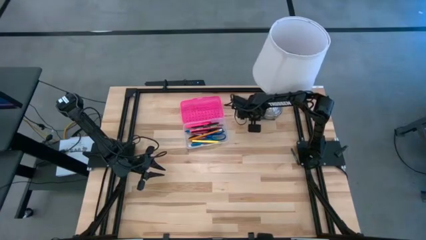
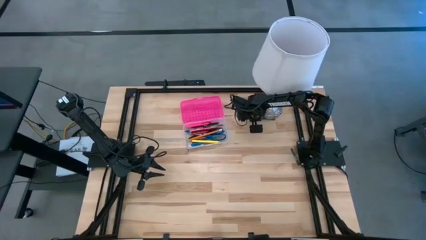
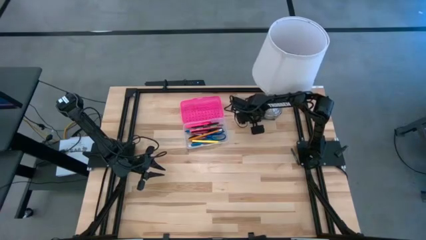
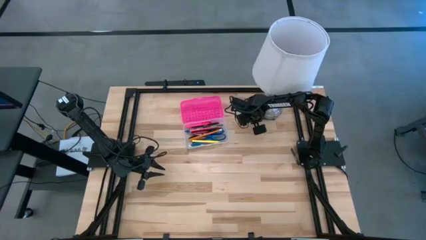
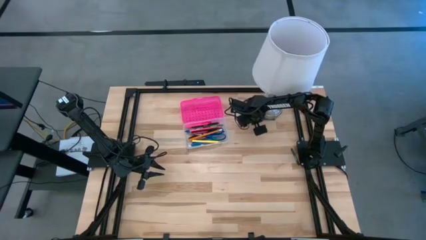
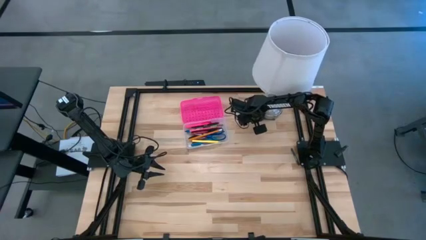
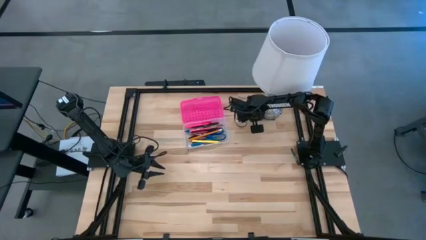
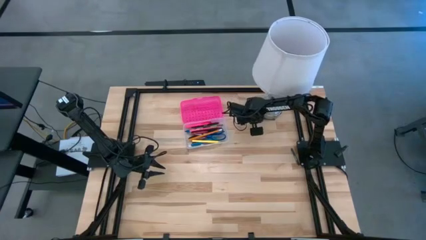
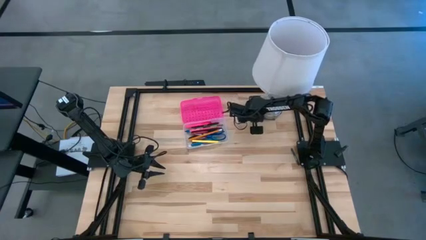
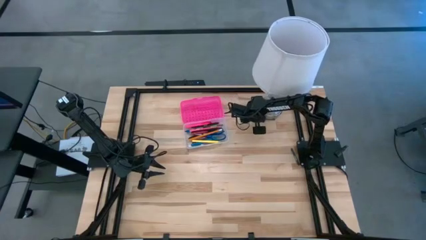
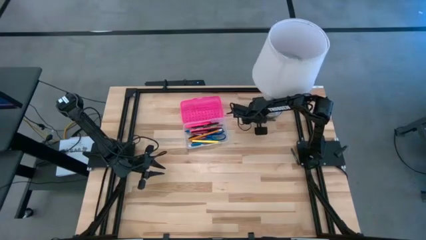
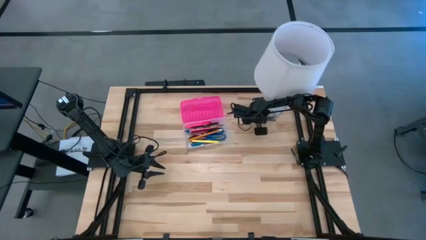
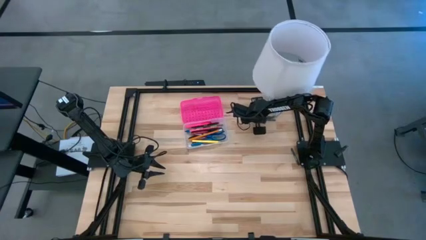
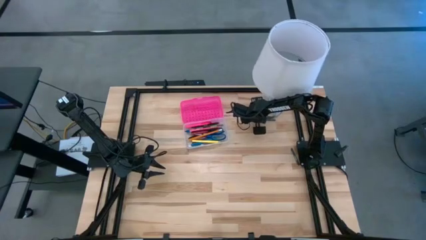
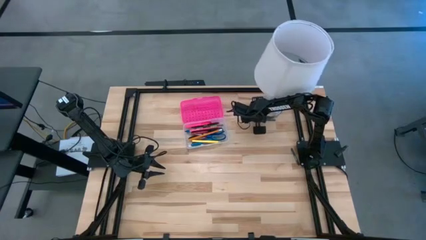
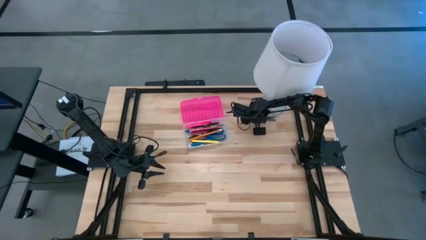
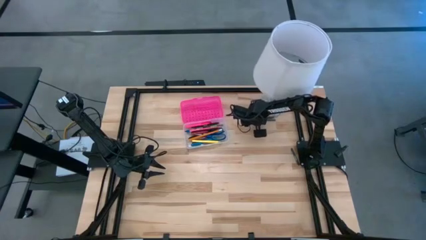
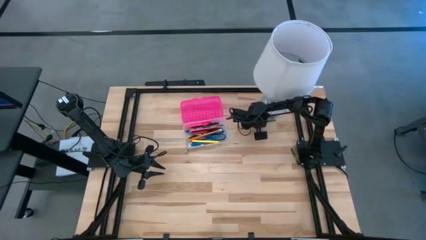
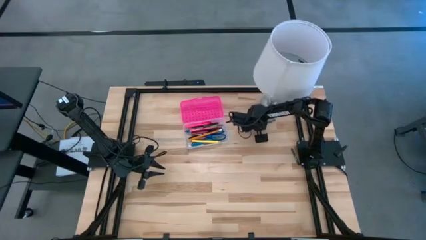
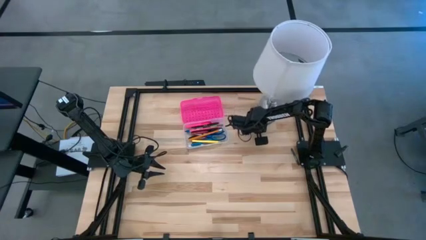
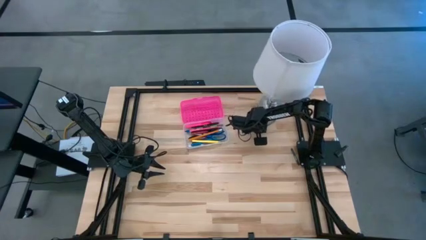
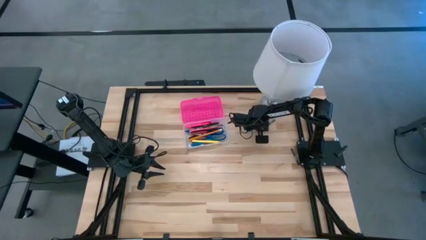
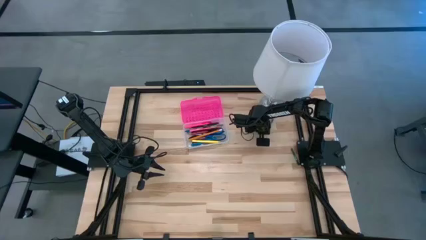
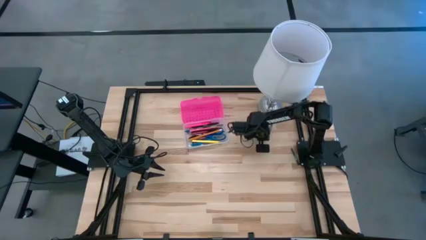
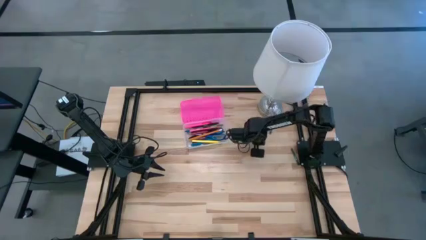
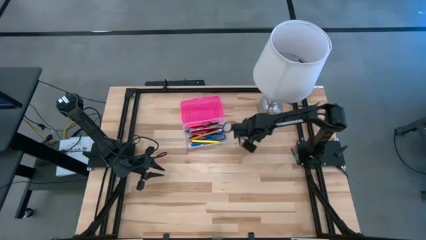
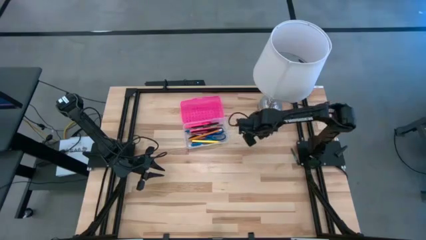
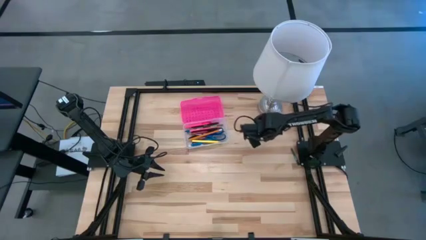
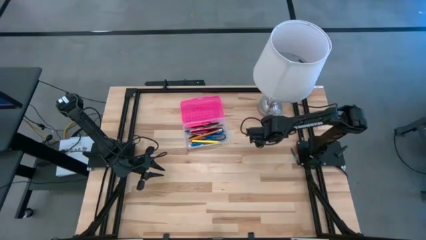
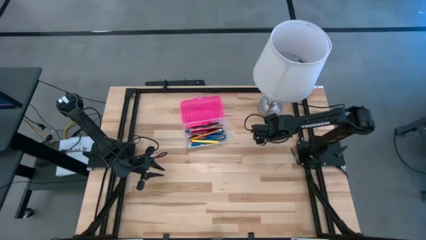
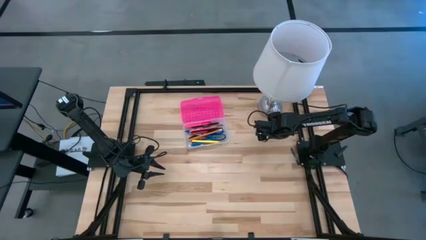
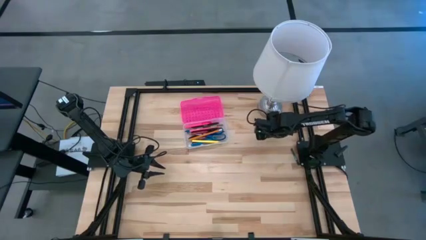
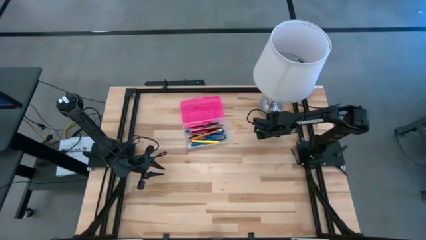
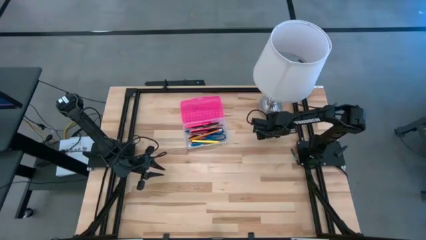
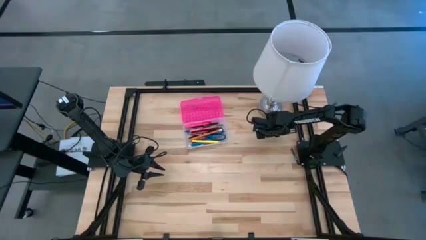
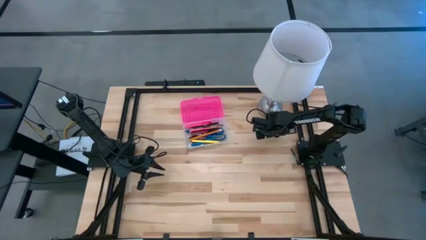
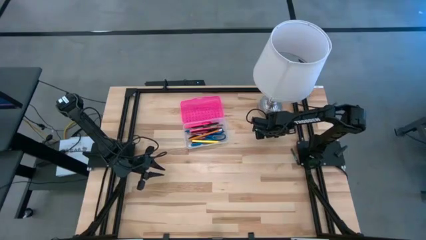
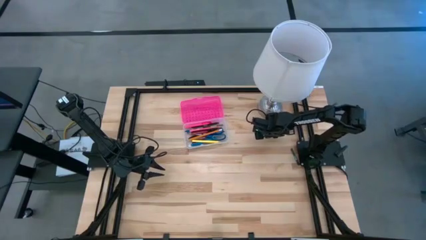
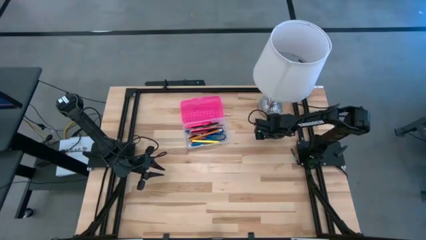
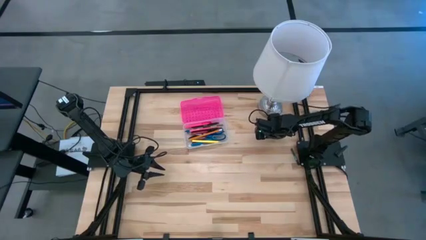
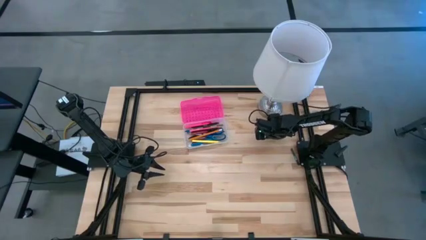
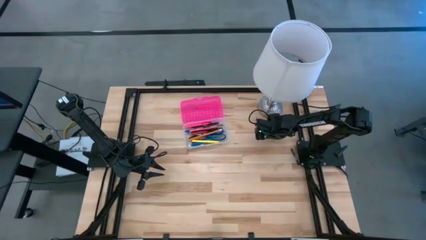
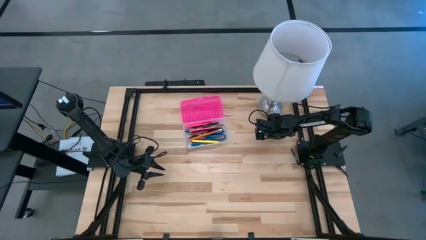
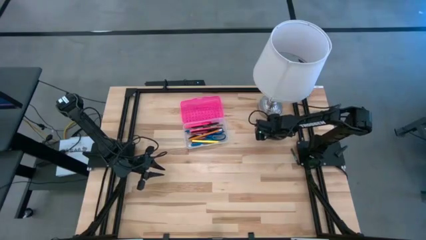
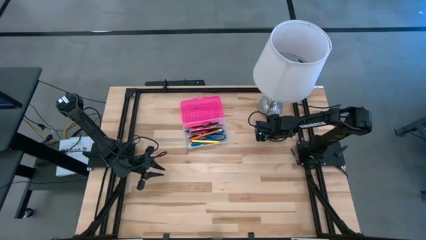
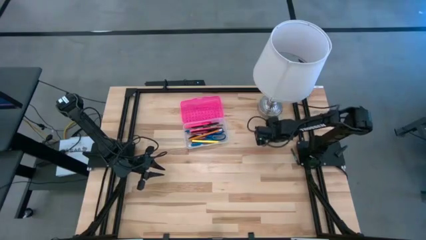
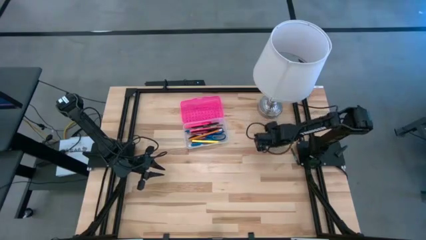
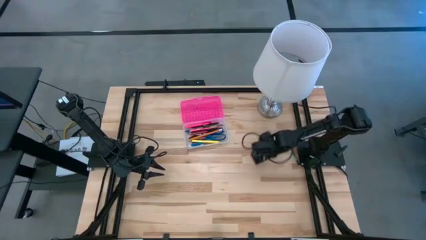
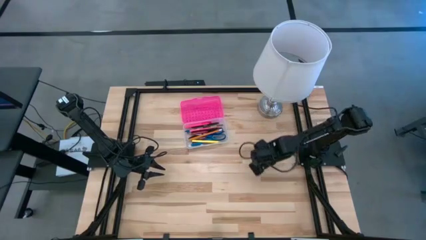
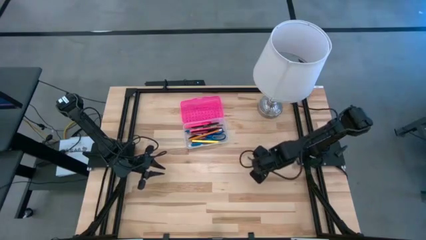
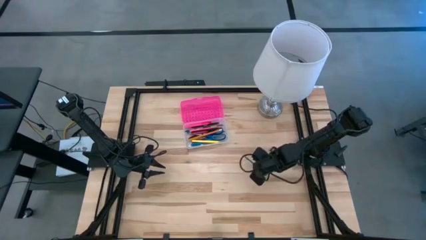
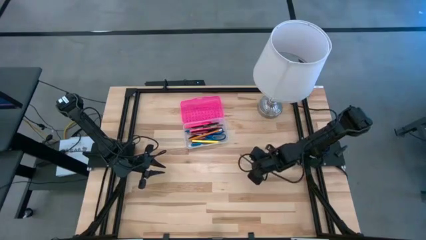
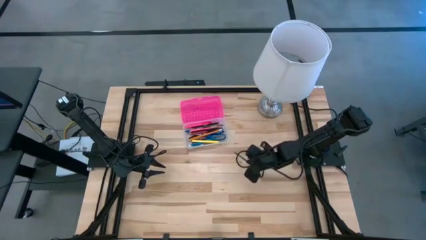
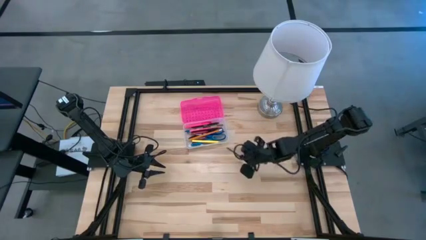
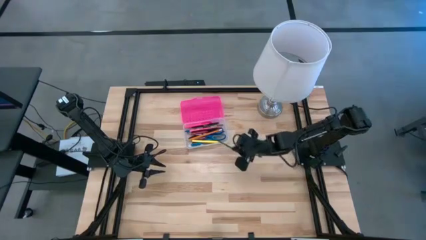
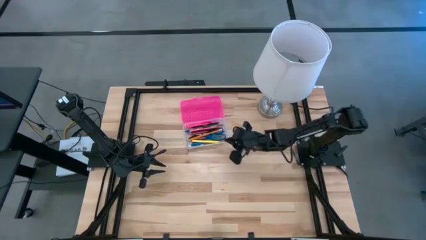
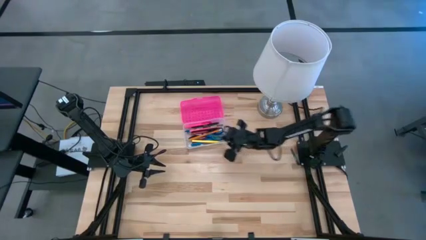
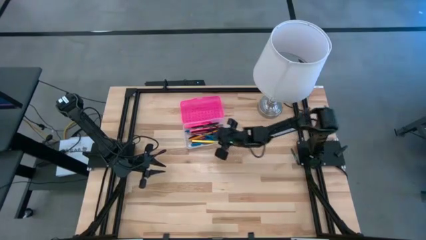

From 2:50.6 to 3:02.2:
Task: Pick & place school supplies into a supply box
Put the green crayon into the pink supply box

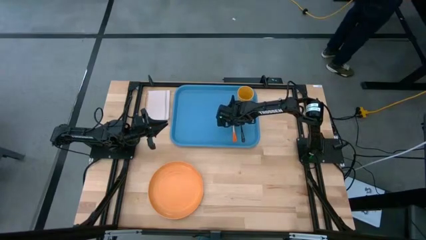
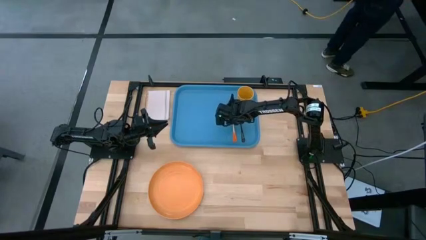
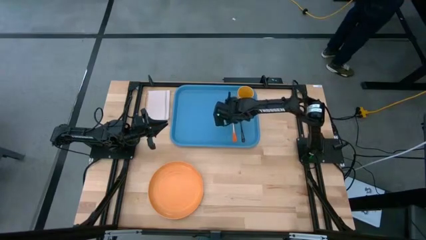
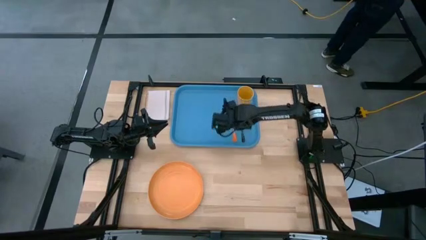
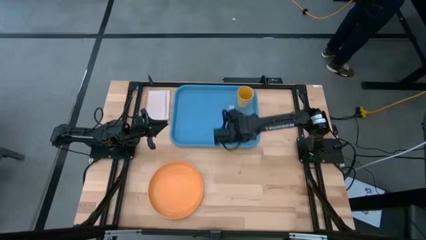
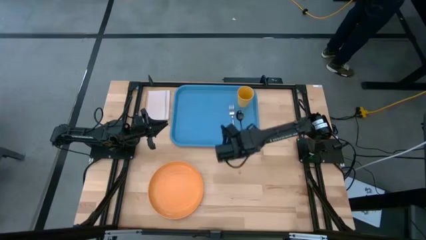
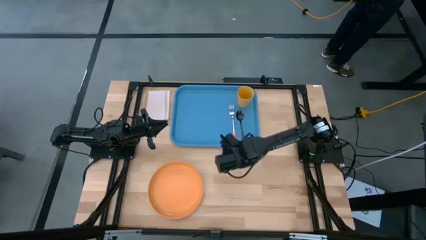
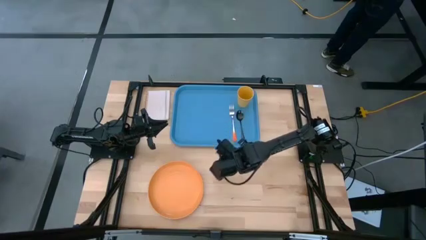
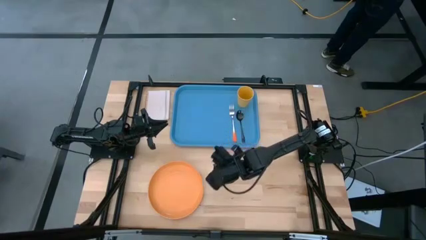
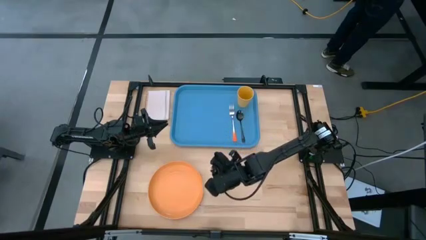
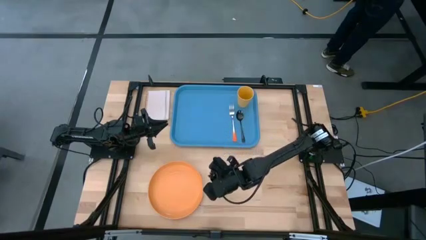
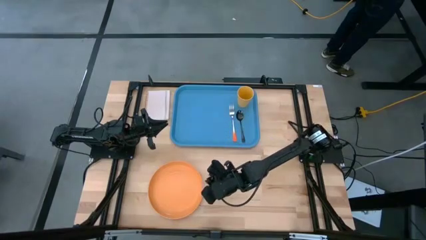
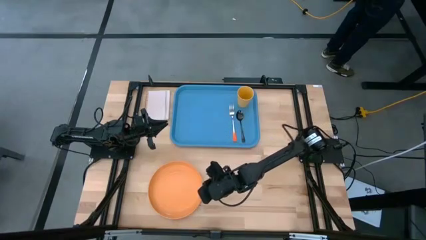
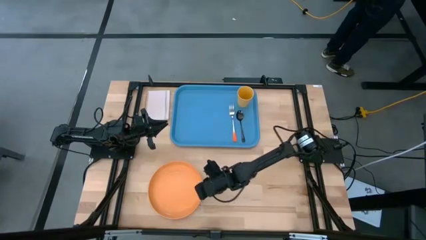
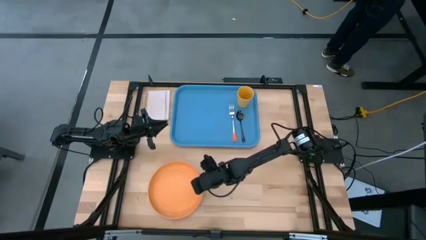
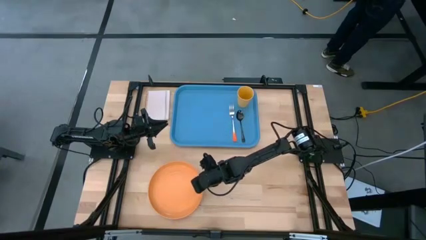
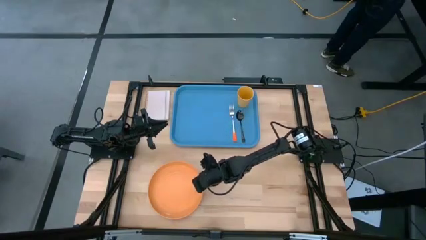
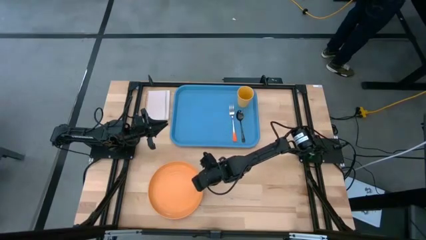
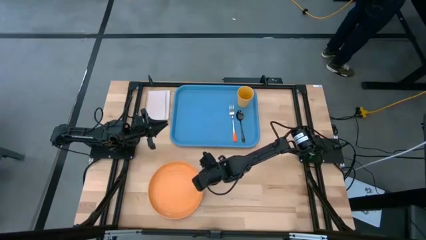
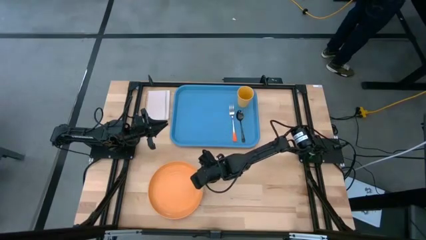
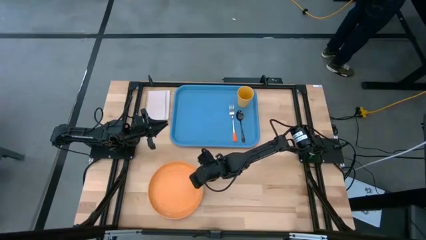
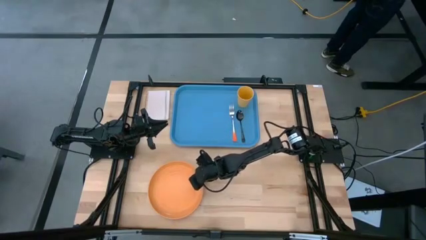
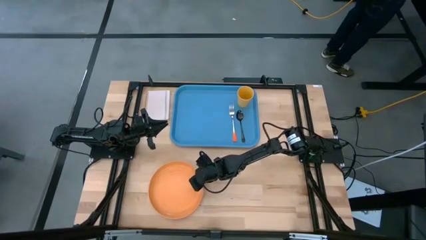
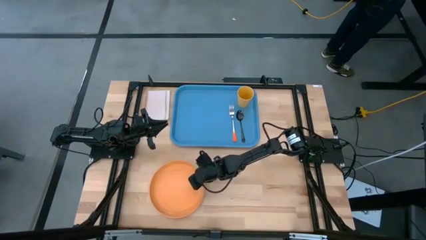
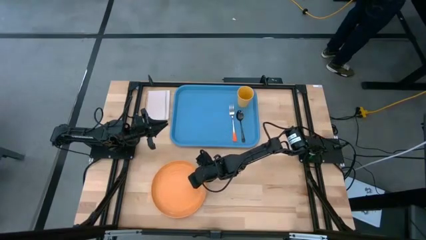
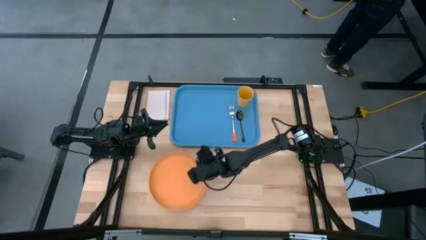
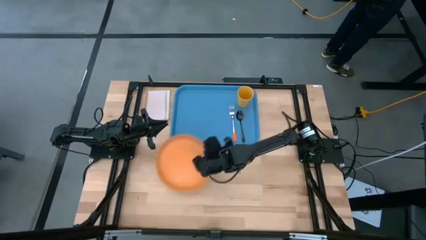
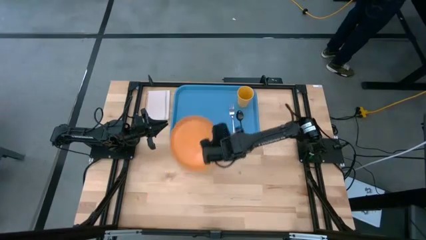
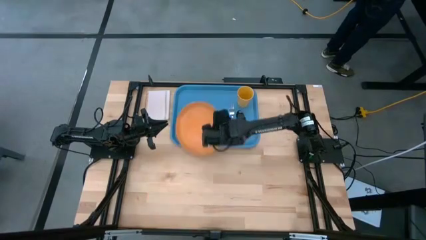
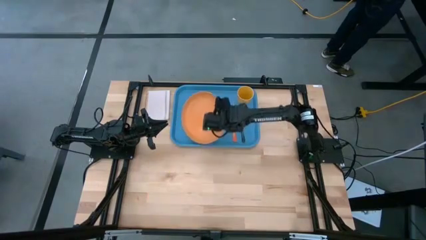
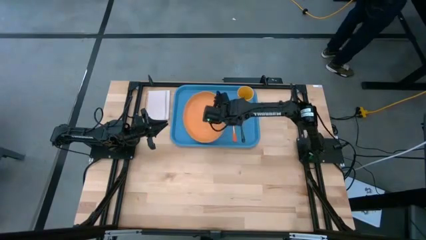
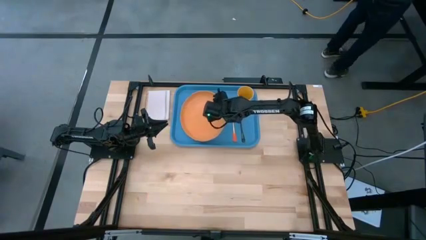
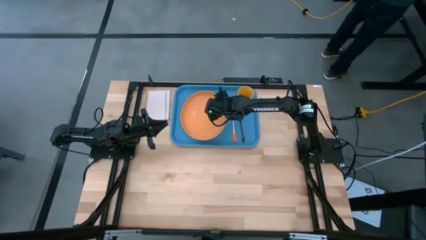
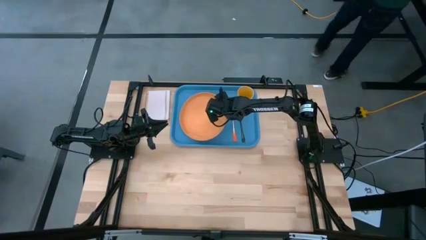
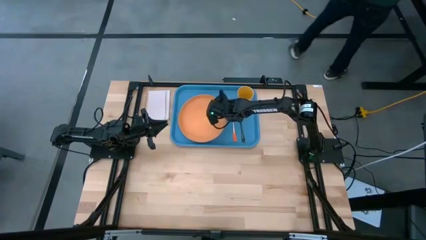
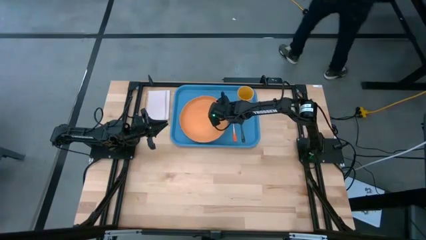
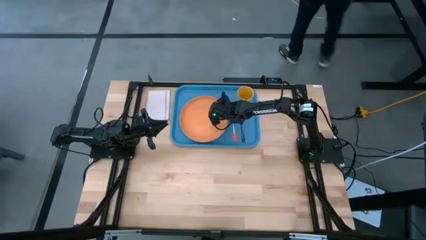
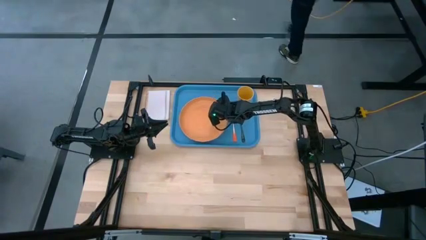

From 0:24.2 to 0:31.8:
Task: Pick and place plate/cup/fork/spoon on tray
Put the orange plate on the blue tray
